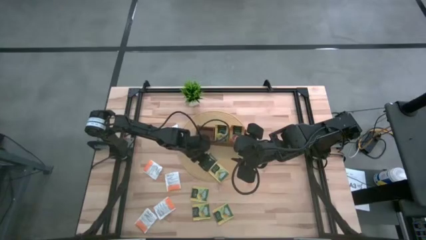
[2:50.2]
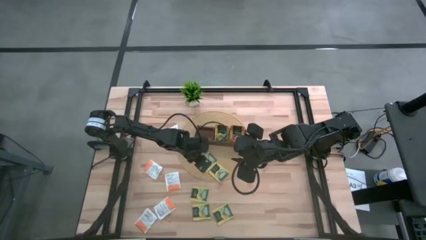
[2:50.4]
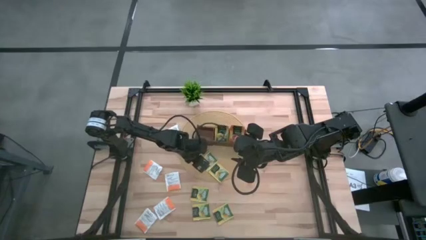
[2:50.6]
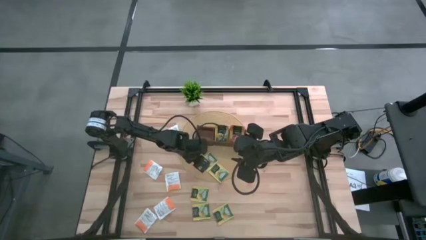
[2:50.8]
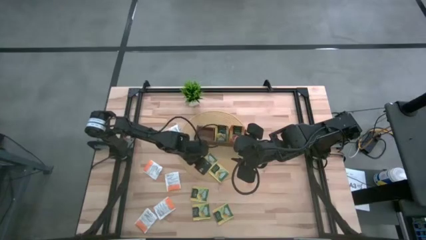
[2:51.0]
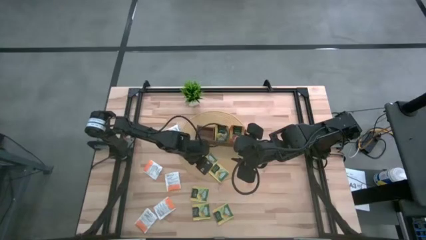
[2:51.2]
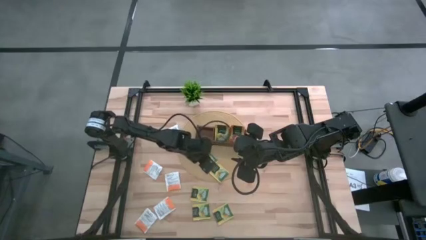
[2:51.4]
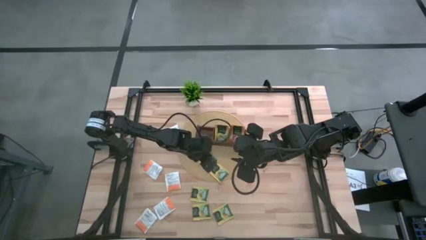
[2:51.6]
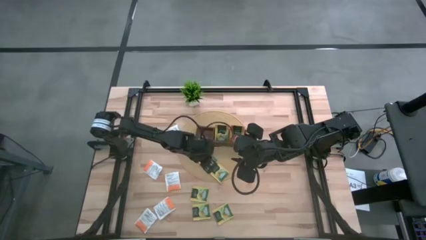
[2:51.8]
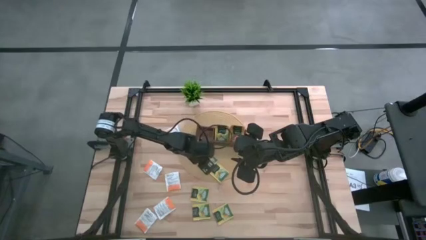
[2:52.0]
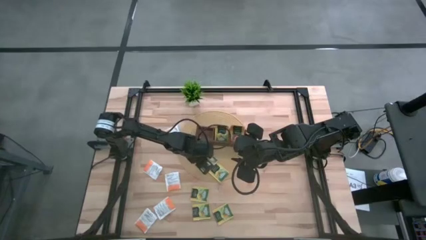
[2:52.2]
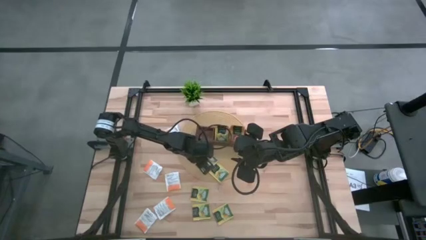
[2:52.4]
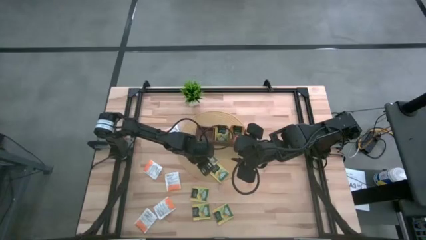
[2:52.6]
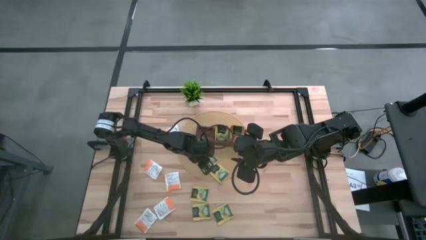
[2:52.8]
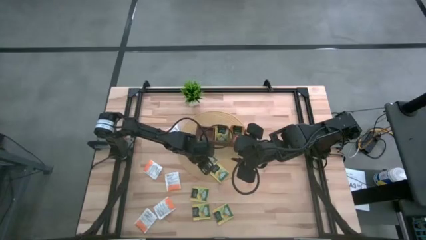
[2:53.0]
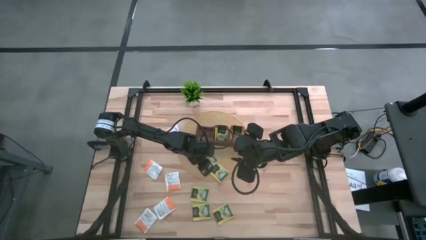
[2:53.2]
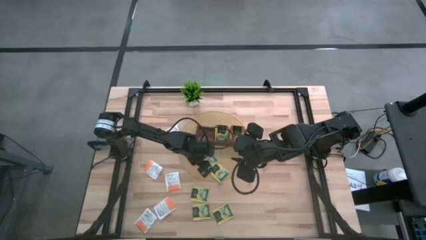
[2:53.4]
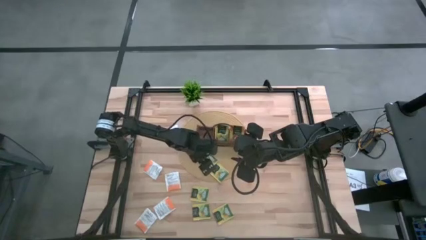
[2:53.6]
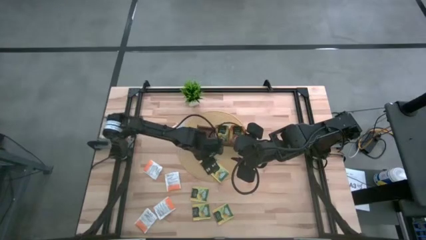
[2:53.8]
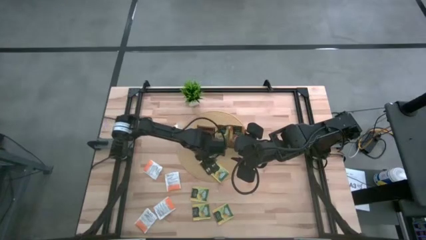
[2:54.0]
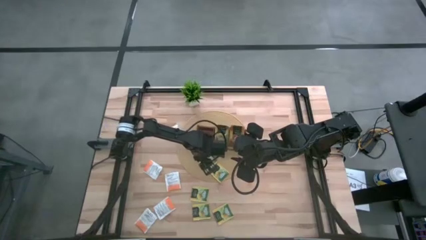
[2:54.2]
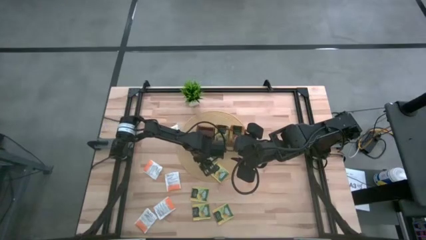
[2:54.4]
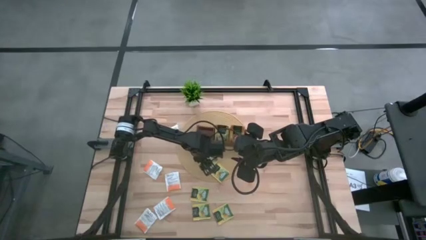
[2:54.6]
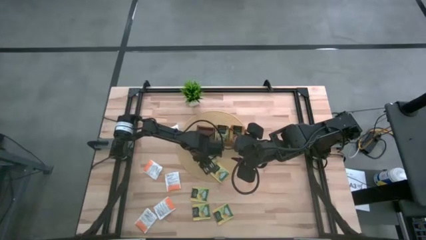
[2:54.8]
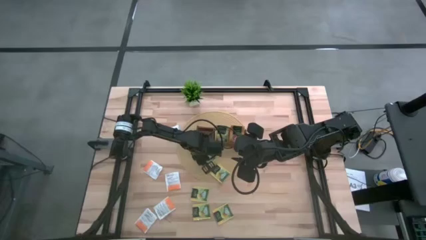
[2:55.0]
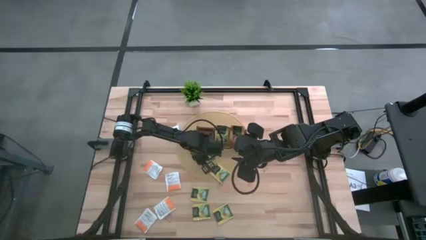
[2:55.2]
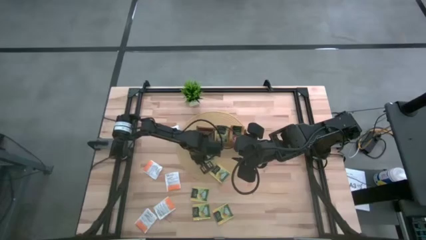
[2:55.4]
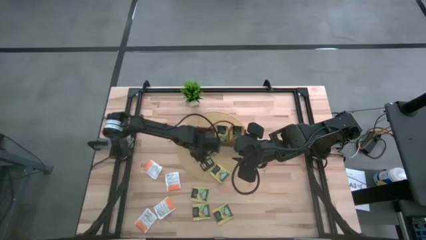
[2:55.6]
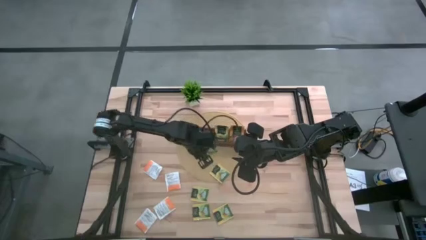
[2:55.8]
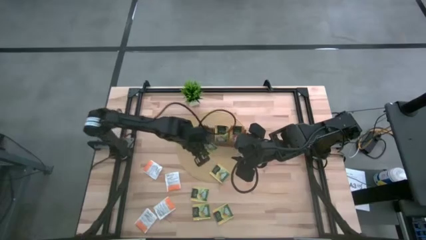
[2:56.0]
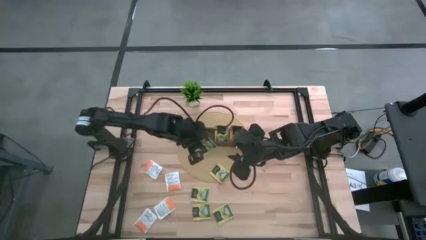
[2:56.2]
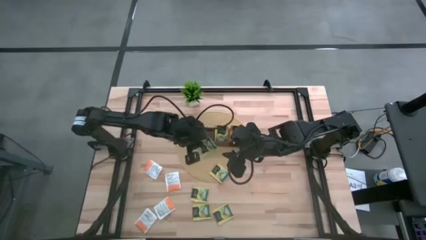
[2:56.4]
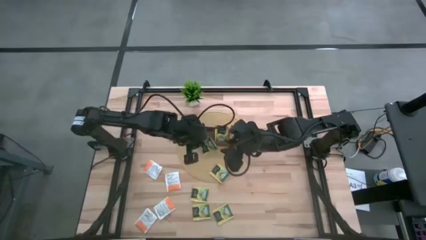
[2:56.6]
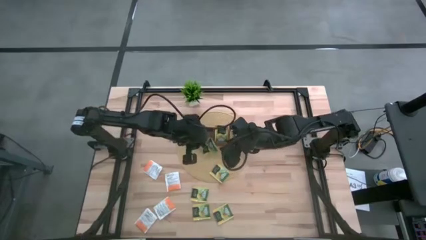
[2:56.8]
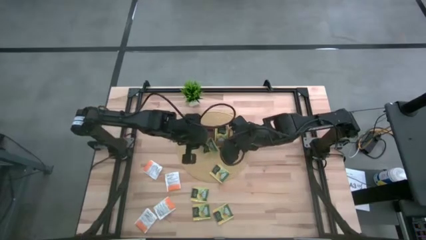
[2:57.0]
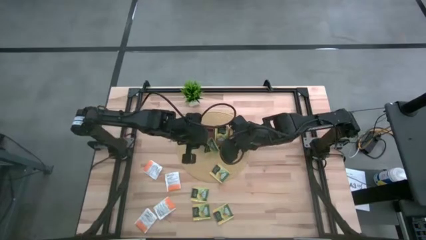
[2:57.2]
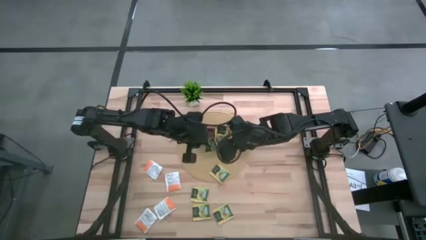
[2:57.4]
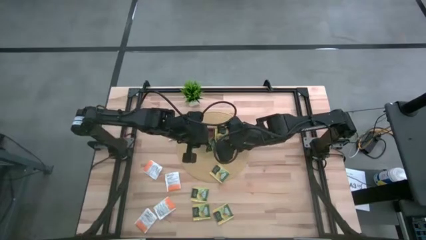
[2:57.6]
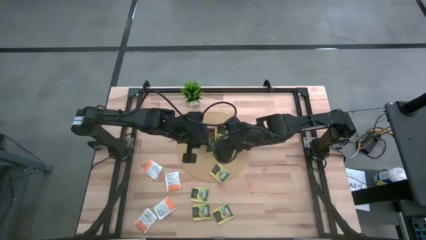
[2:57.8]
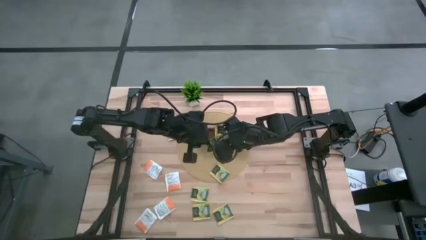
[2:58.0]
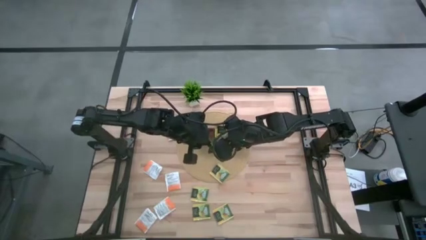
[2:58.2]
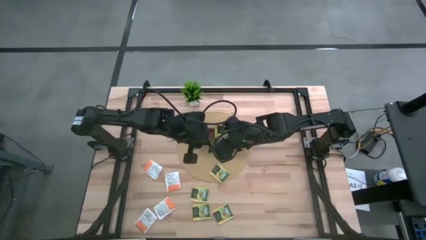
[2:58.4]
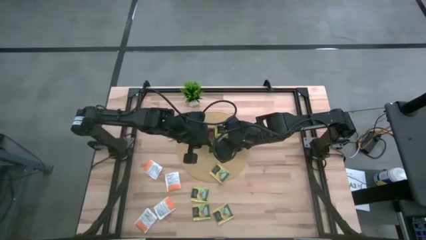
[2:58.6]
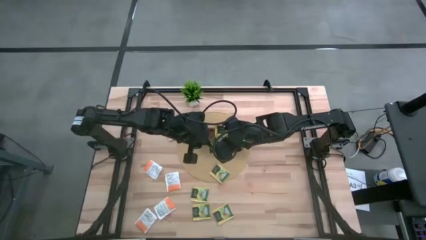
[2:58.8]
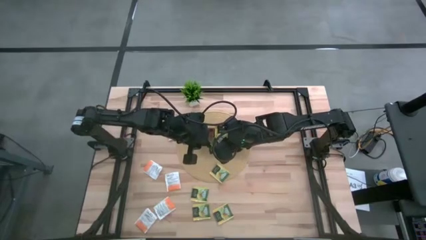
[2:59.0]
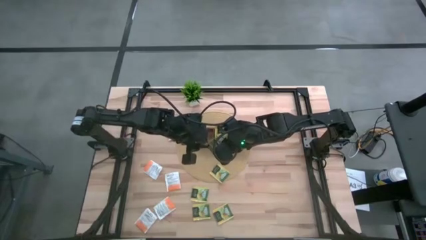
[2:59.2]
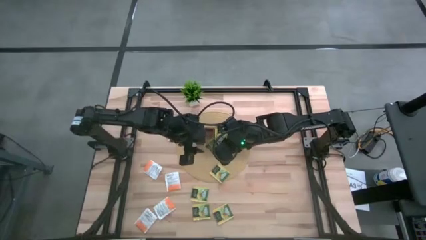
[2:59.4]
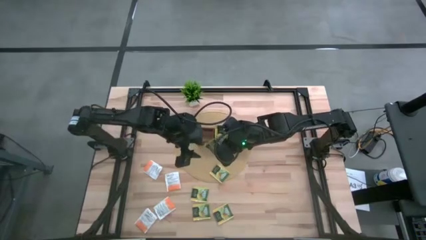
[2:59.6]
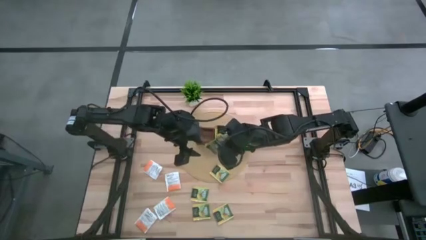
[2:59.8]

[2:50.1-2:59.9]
Task: Pick & Place Tea
Put the yellow tea bag into the middle section of the wooden organizer

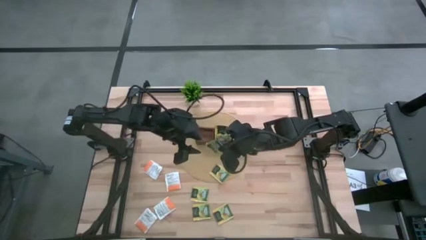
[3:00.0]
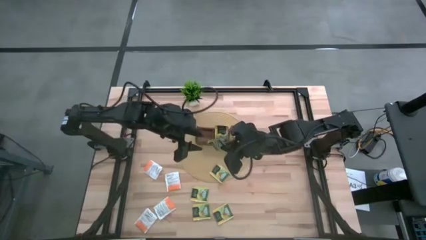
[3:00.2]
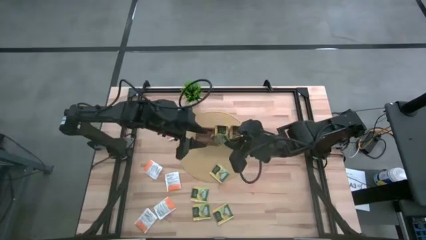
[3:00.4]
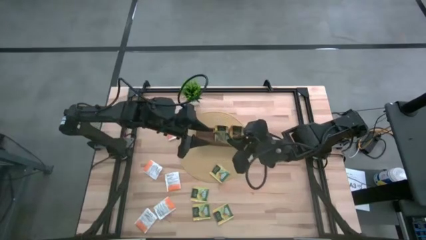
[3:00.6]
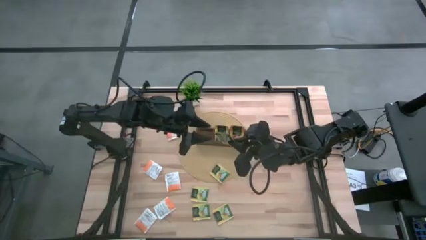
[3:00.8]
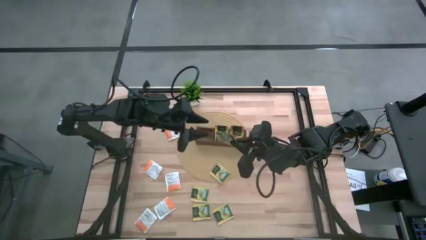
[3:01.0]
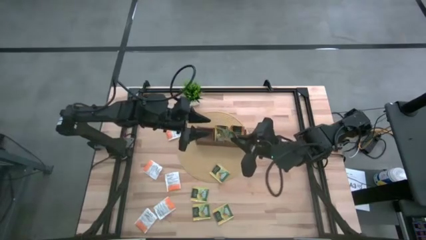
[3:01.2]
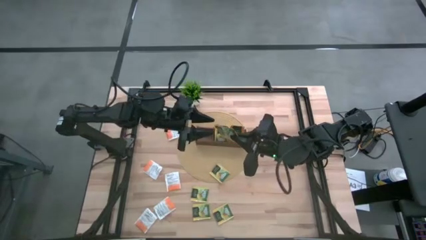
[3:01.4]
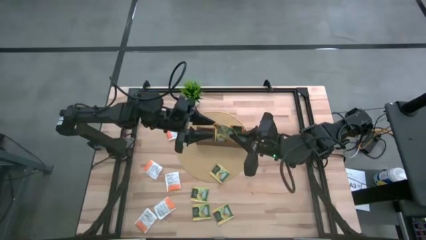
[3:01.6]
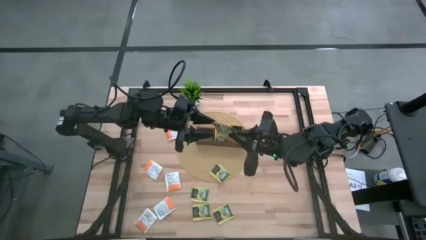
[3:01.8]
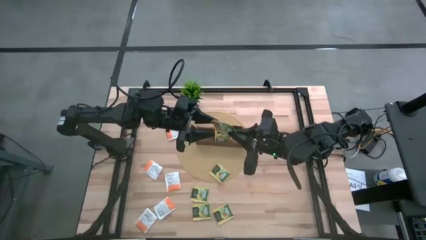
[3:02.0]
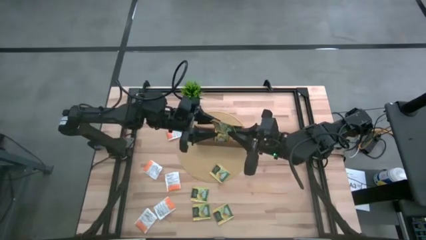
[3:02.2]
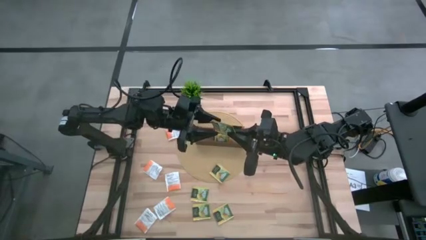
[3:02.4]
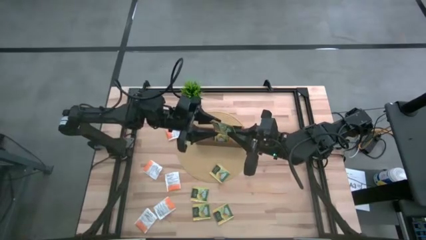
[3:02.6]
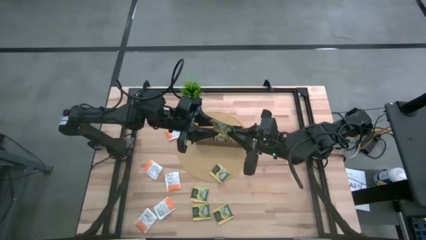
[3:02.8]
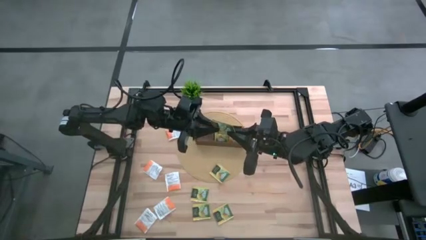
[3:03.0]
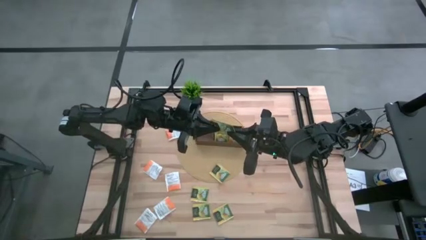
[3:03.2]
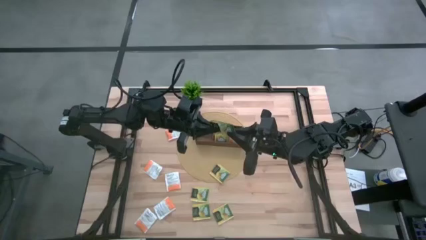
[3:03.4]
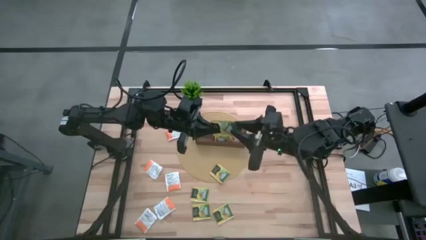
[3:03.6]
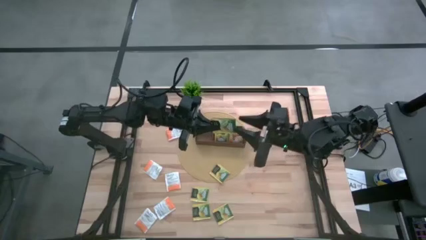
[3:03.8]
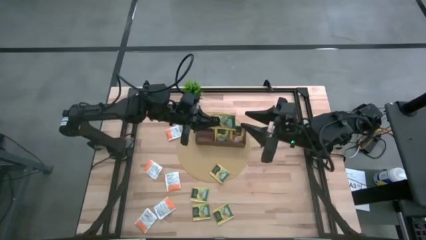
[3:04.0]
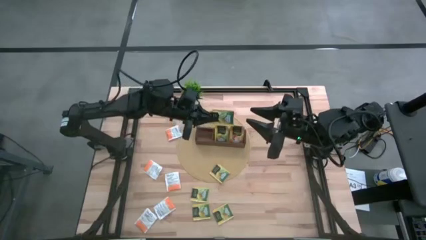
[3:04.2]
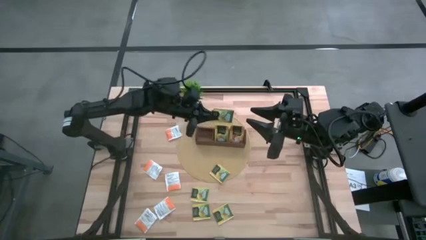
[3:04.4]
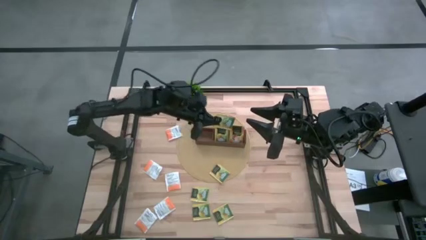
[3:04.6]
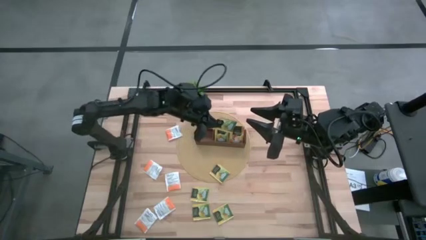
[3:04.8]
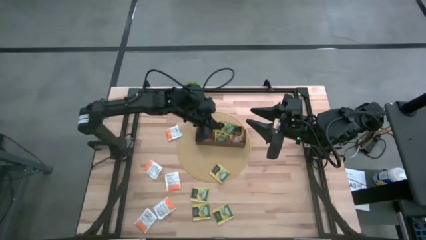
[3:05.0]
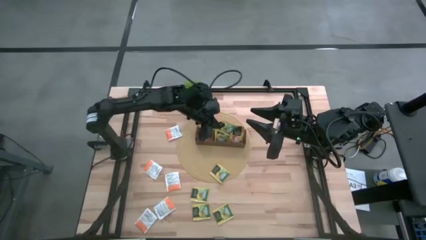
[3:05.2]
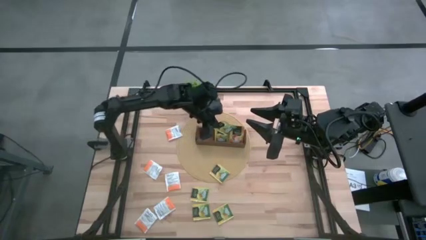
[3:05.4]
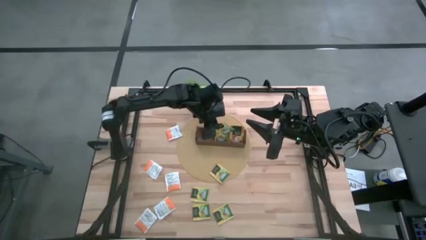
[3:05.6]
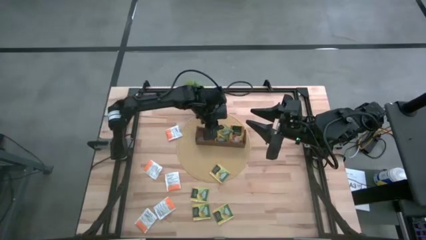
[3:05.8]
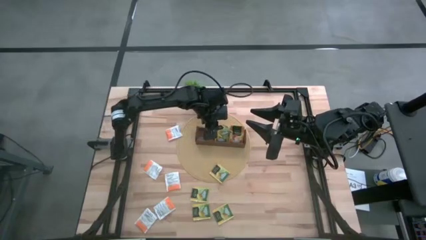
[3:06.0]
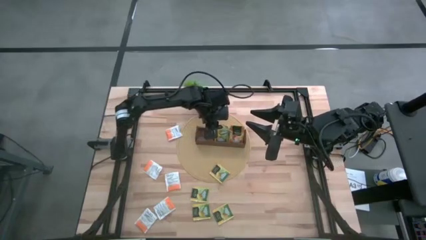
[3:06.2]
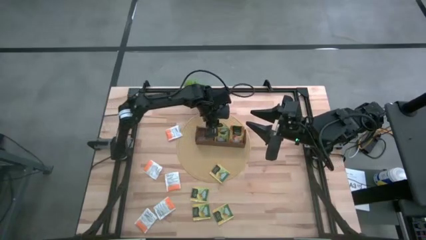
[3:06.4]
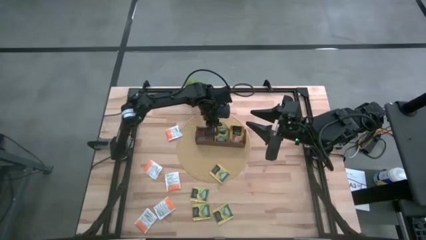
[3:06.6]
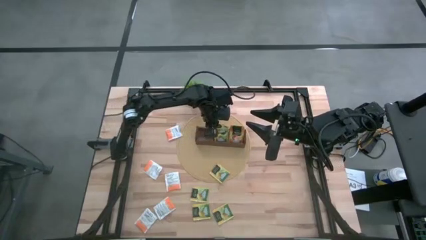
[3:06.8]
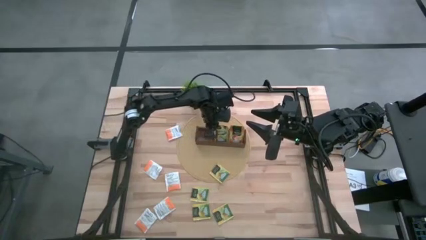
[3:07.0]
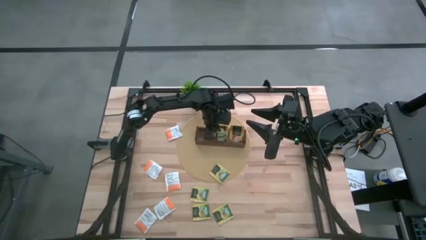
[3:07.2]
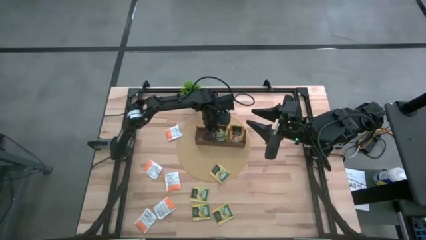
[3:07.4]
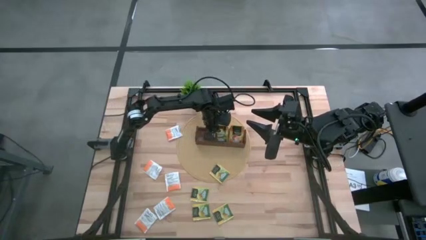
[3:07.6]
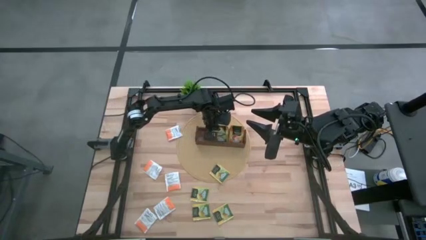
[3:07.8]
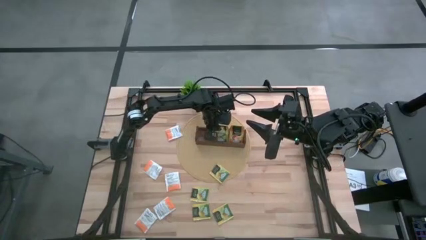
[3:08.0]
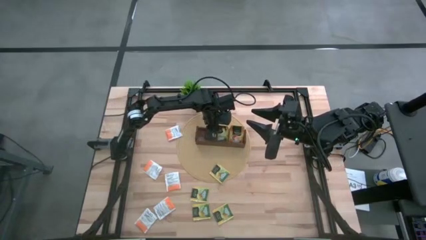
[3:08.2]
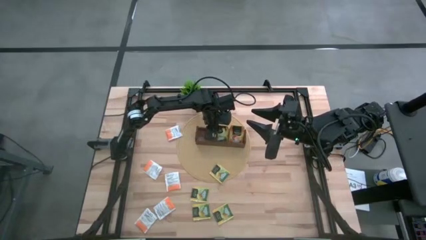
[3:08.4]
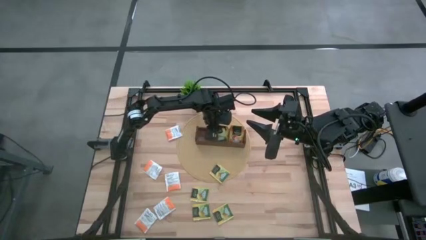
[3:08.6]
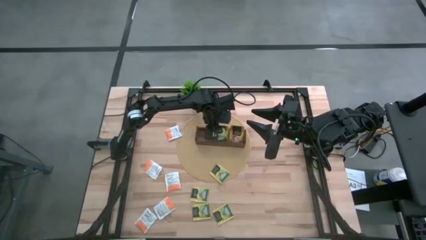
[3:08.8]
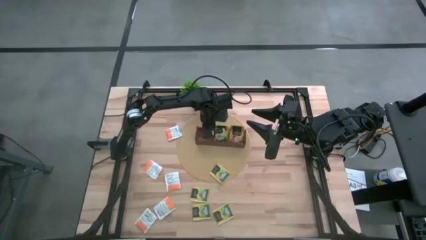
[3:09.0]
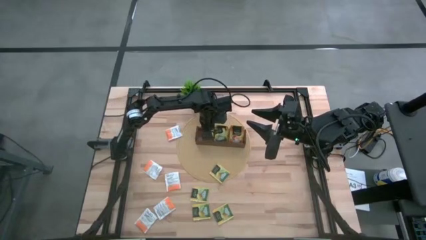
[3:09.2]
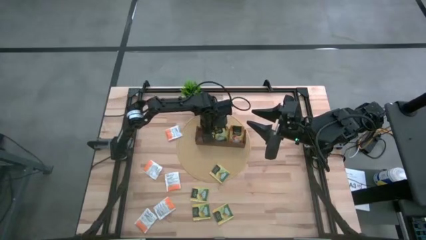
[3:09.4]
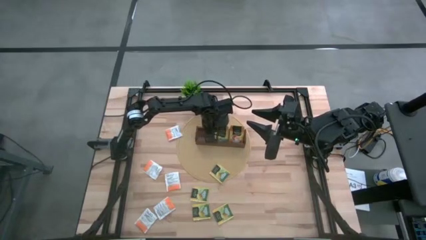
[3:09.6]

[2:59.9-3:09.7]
Put the yellow tea bag into the middle section of the wooden organizer
